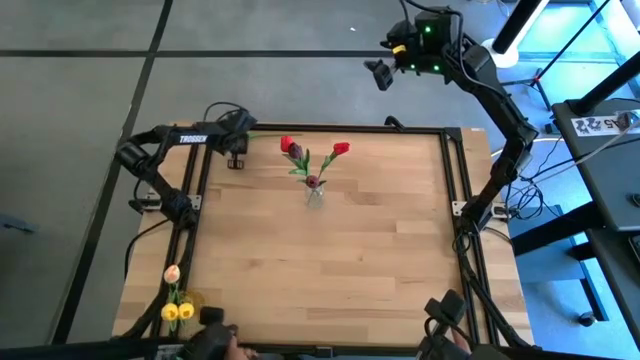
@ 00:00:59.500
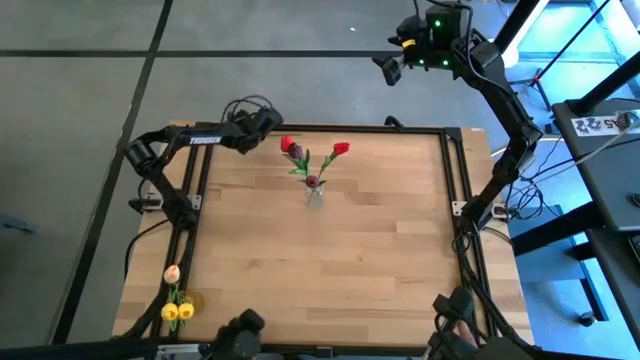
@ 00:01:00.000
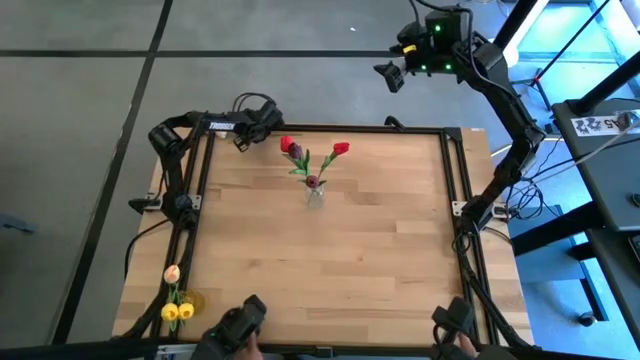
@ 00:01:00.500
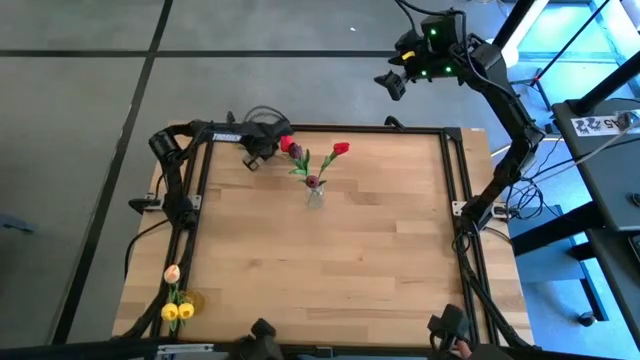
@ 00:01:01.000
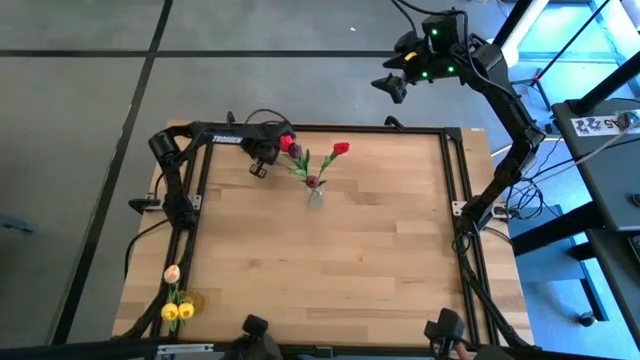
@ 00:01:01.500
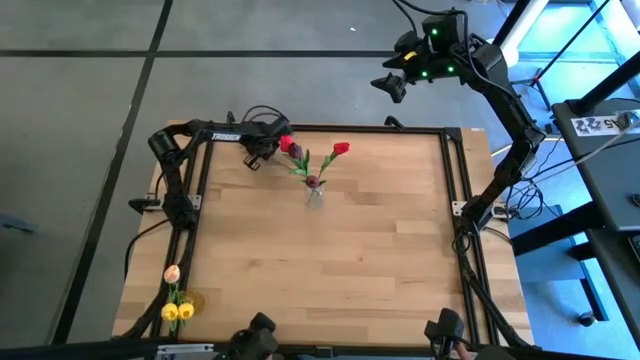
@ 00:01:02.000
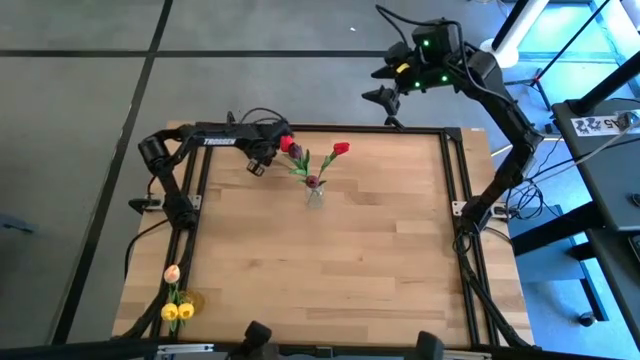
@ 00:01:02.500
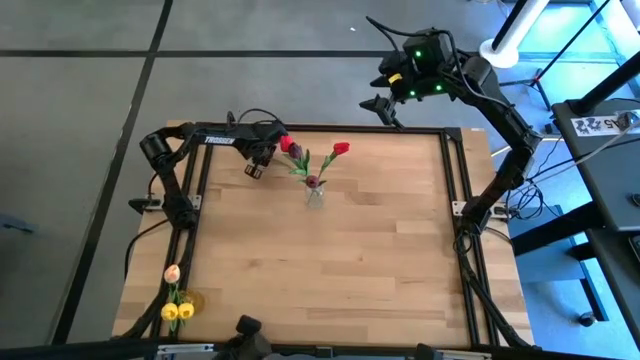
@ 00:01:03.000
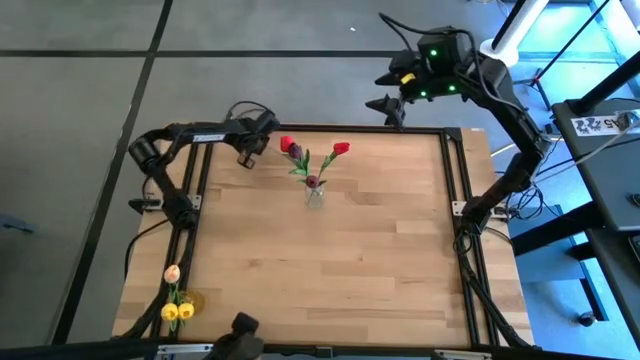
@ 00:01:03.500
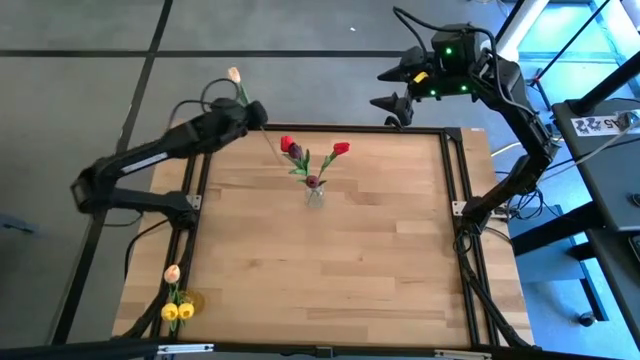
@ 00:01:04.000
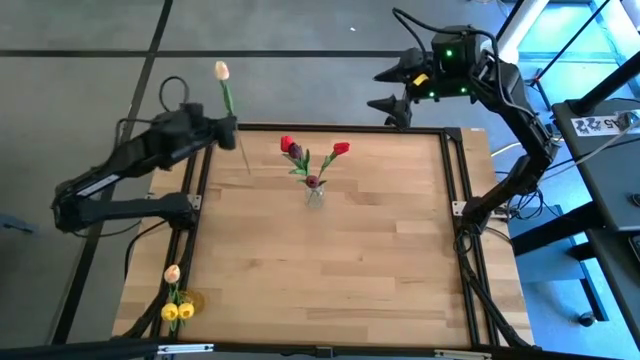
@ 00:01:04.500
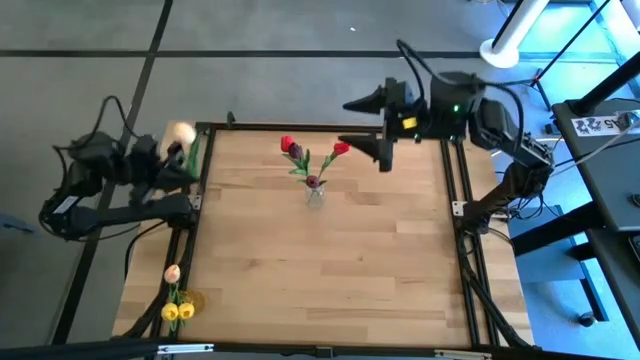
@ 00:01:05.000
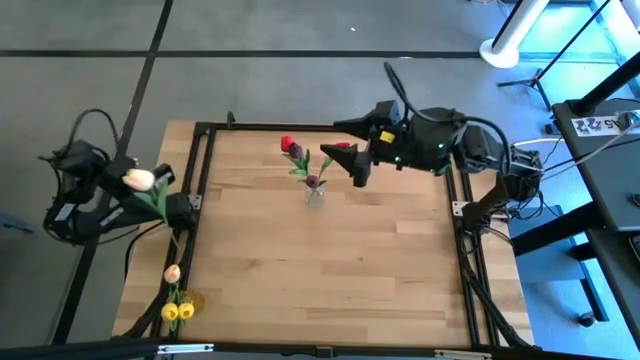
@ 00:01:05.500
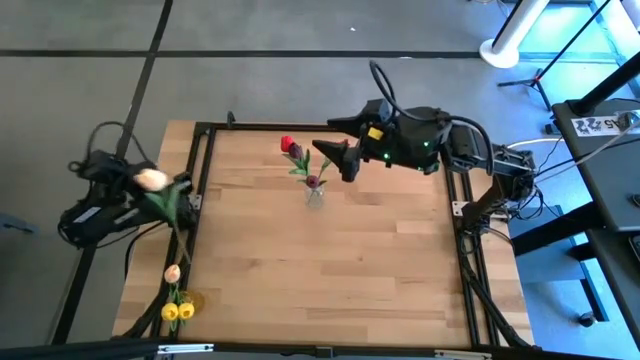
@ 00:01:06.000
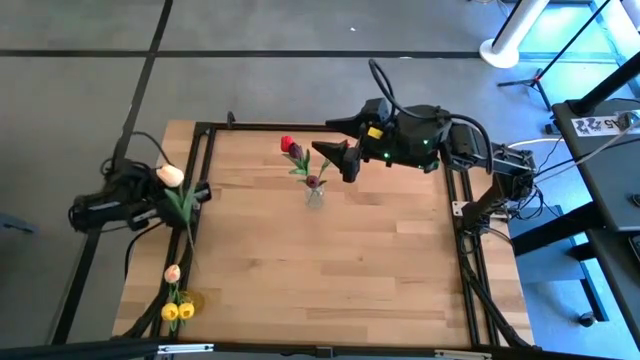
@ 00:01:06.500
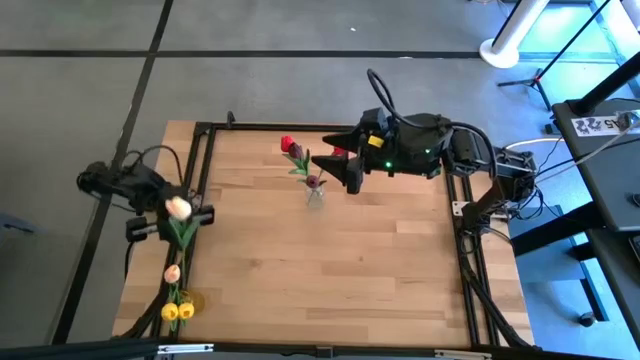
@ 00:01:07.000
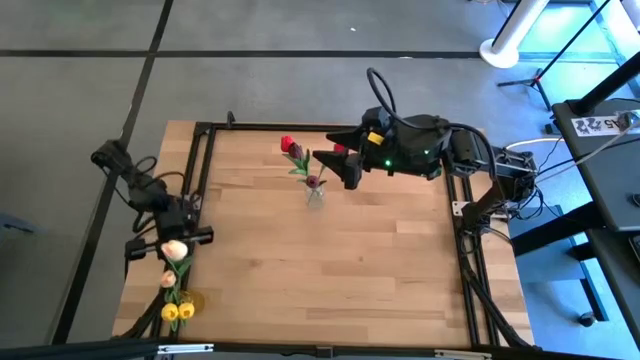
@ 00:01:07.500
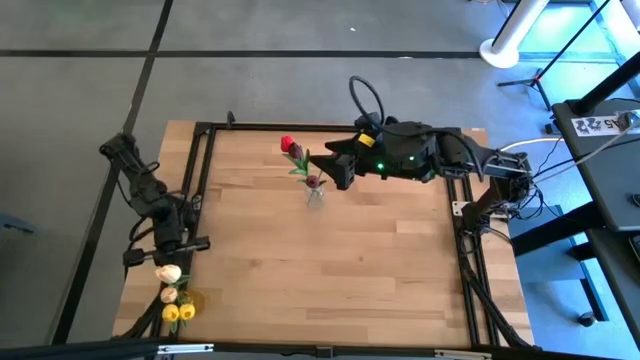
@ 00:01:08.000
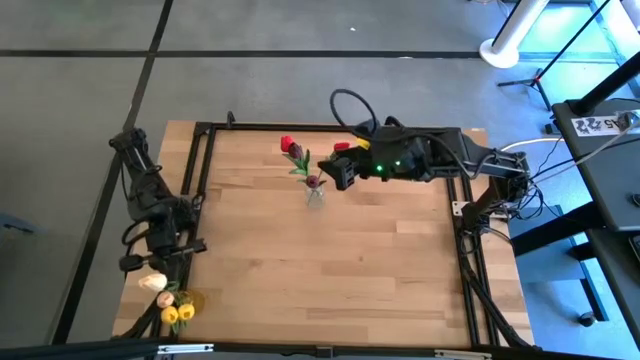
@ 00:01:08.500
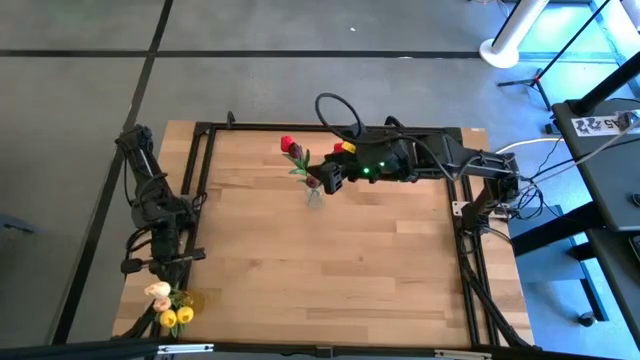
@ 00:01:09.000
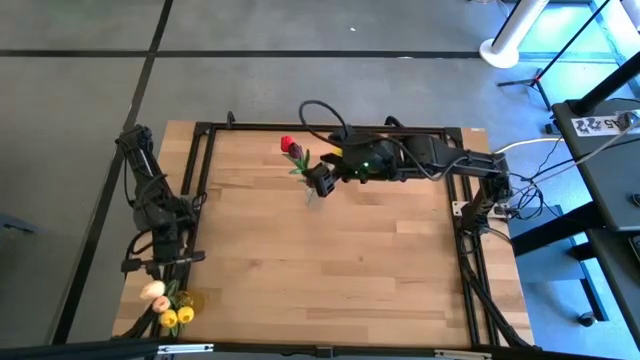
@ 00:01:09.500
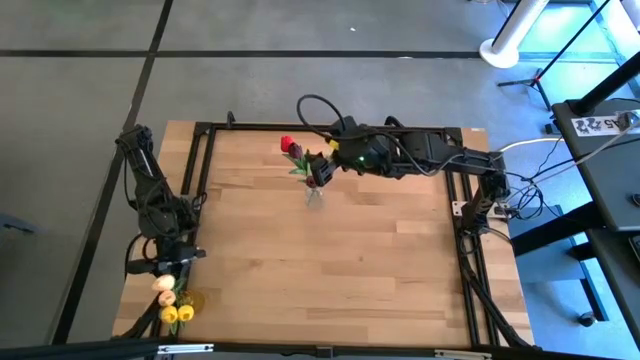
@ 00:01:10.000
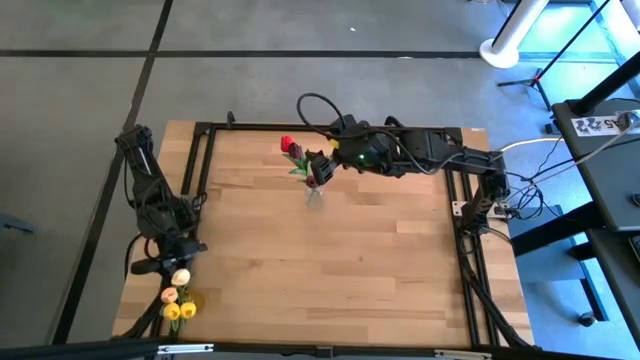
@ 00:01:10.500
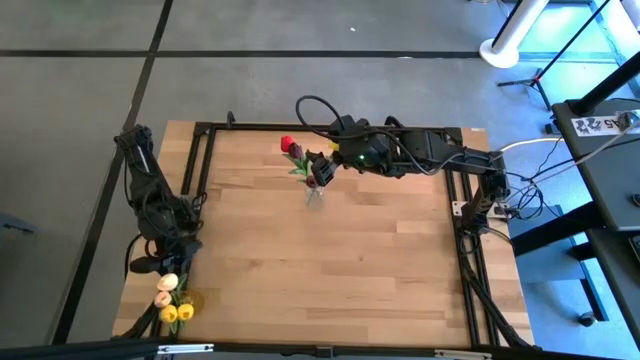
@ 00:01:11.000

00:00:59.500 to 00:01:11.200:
Task: Sort flowers into vase by color
Put the white flower into the yellow vase

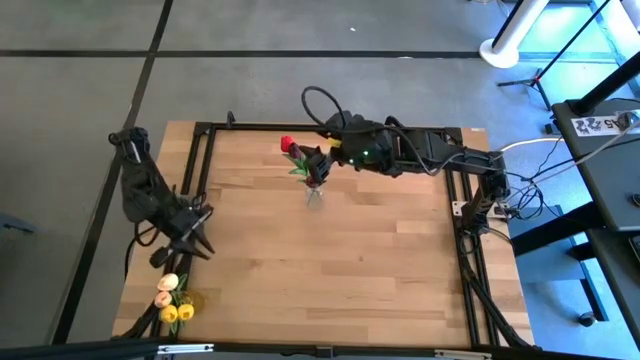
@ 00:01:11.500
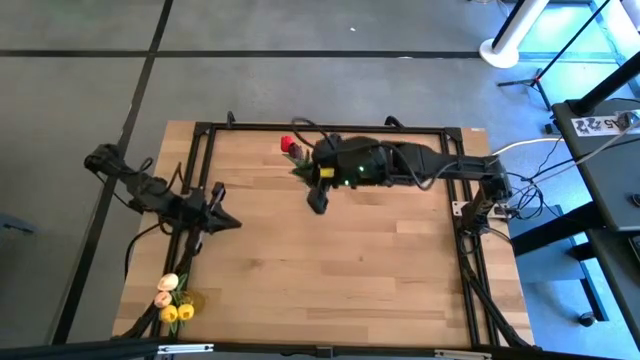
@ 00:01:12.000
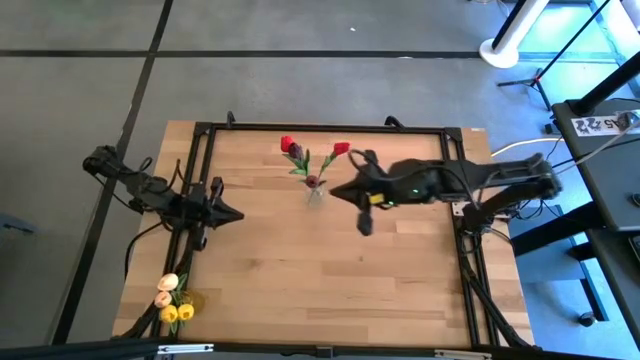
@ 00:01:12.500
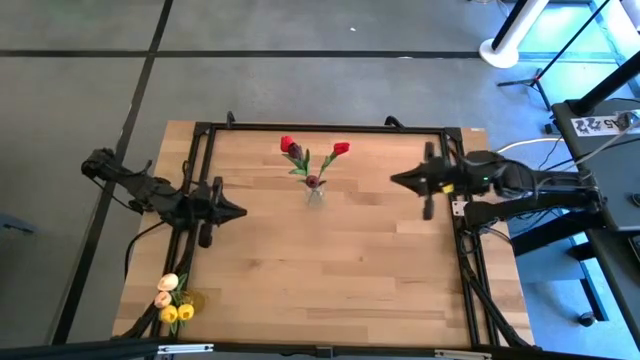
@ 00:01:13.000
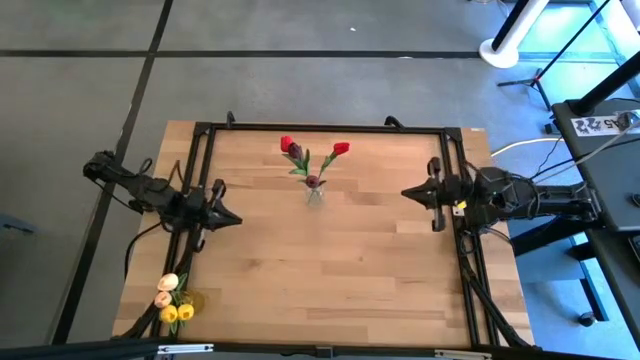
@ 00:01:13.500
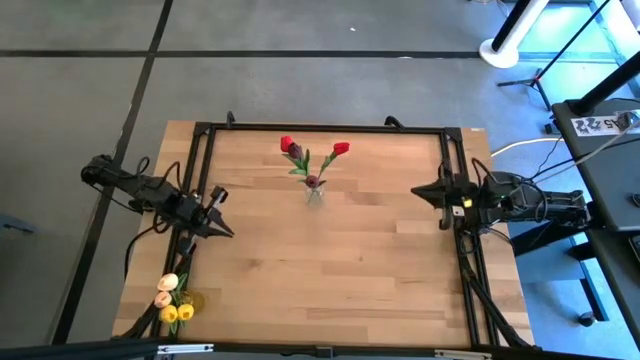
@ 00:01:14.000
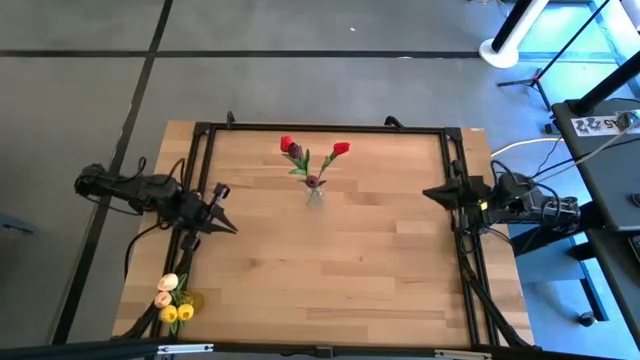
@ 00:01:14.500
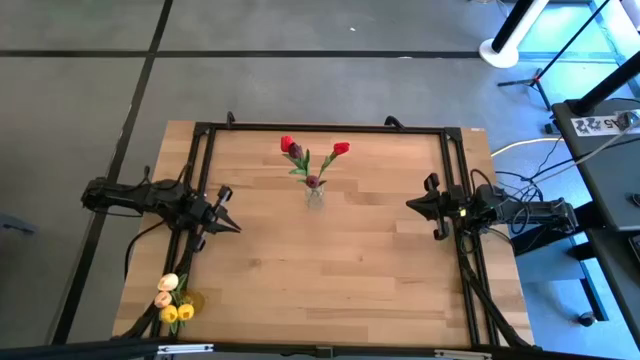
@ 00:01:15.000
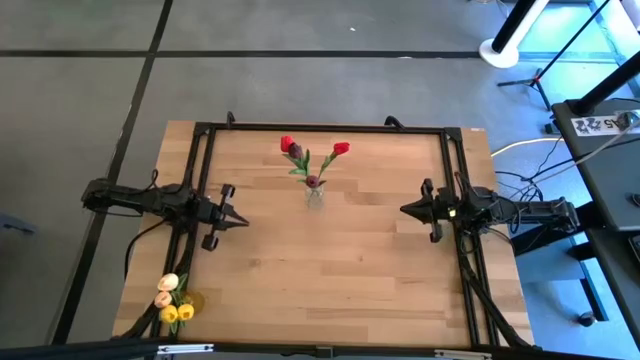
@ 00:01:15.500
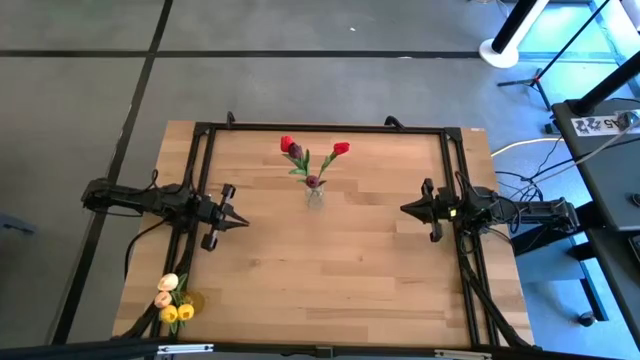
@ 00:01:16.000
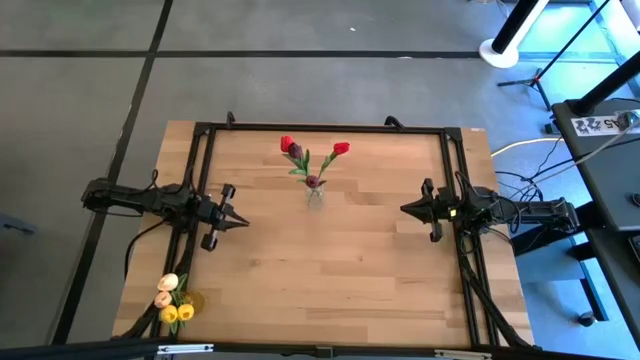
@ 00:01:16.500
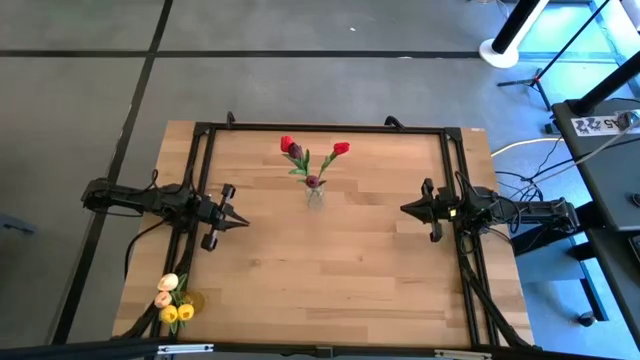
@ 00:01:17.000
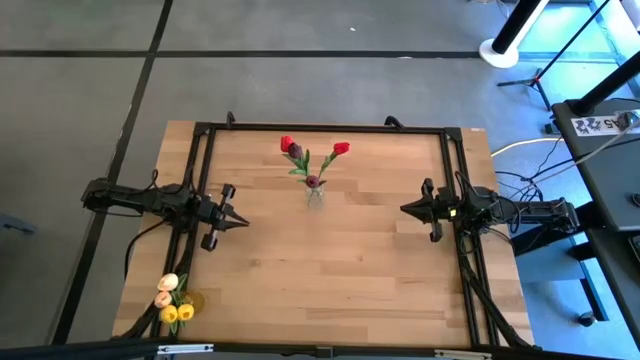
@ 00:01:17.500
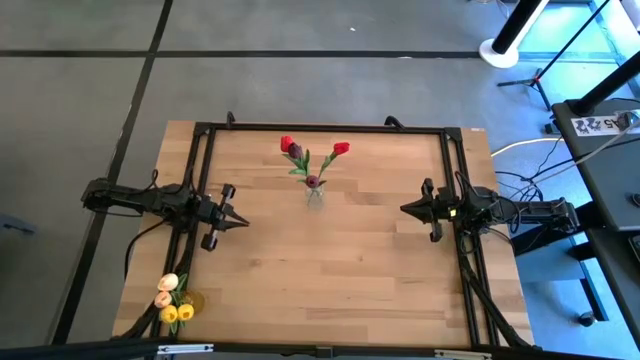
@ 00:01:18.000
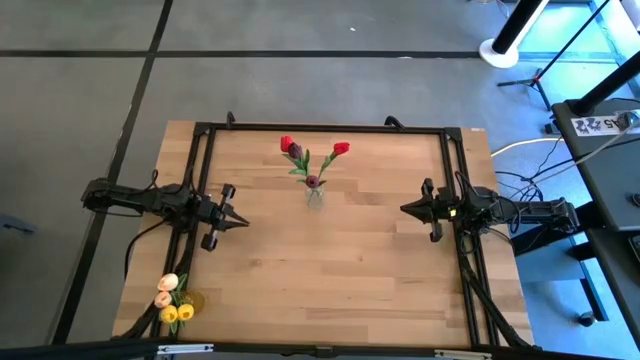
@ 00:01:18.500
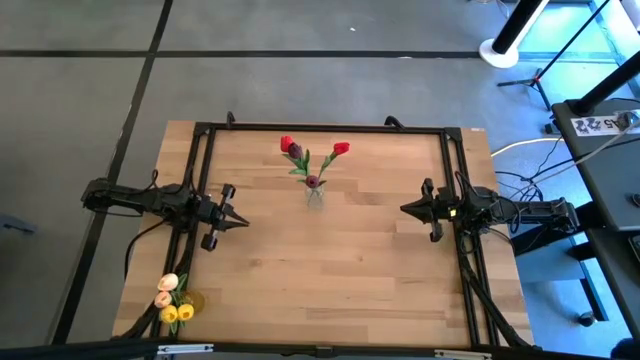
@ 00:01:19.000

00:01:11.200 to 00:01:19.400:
Return to Home Position

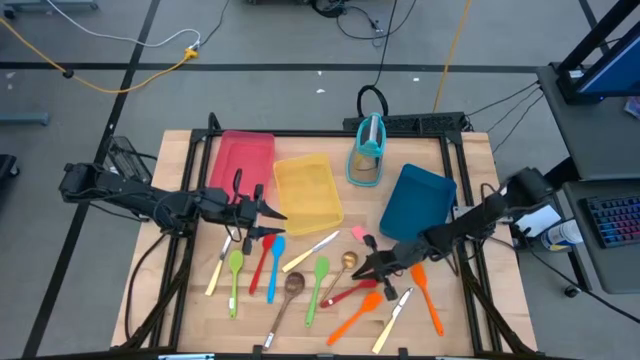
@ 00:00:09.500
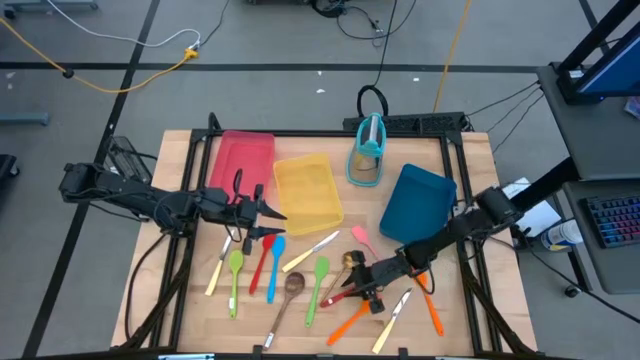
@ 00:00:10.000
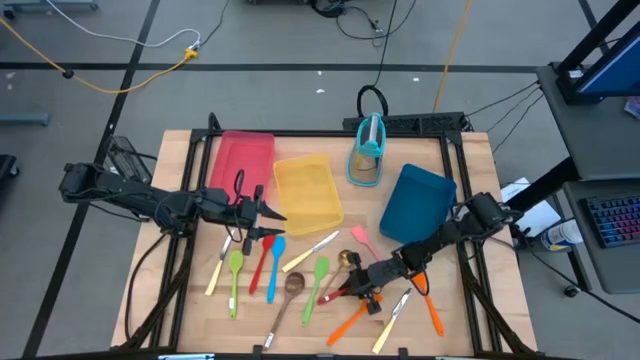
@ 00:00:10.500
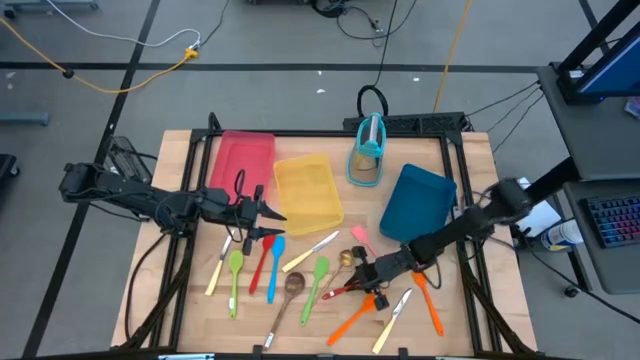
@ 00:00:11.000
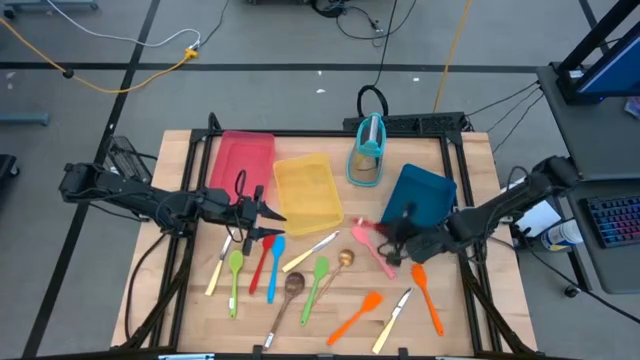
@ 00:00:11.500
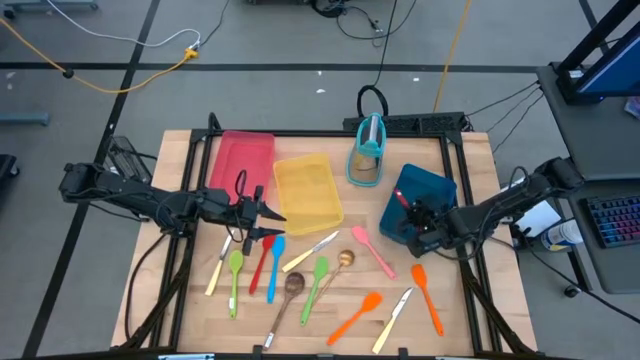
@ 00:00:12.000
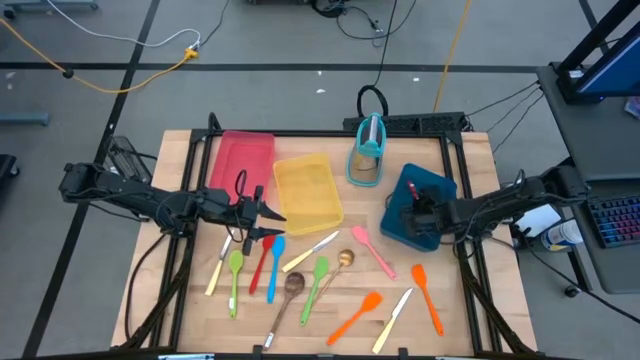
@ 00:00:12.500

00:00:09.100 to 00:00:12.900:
Task: Pick & Place Kitchen Items
Put the red serving spoon into the blue bin
